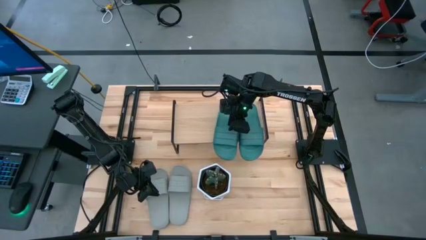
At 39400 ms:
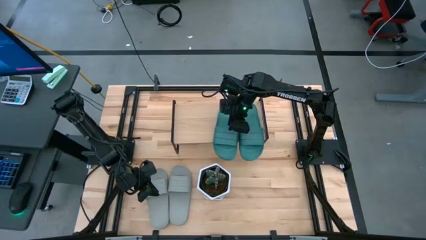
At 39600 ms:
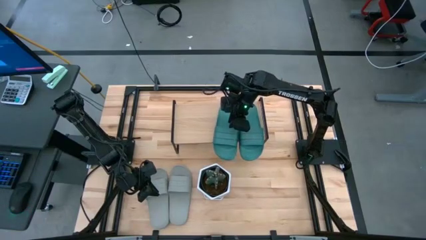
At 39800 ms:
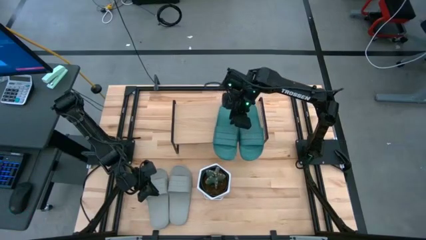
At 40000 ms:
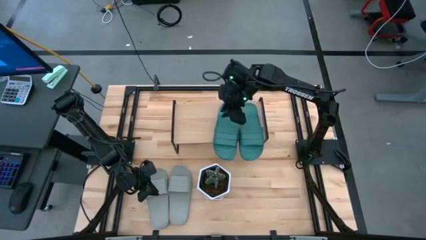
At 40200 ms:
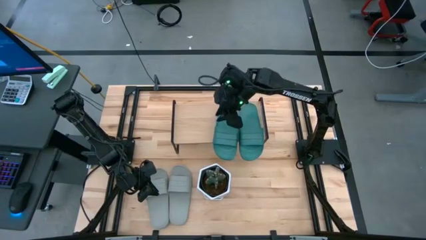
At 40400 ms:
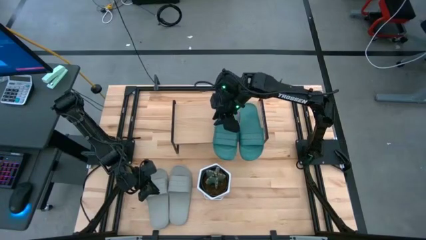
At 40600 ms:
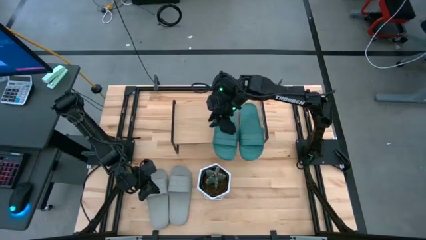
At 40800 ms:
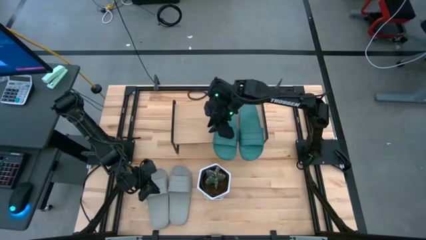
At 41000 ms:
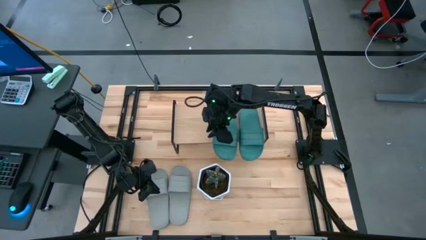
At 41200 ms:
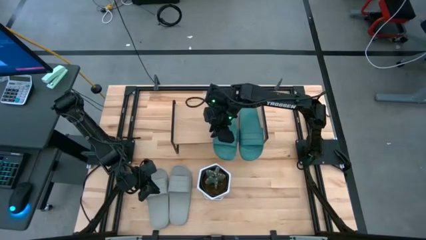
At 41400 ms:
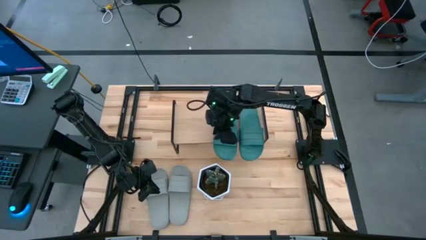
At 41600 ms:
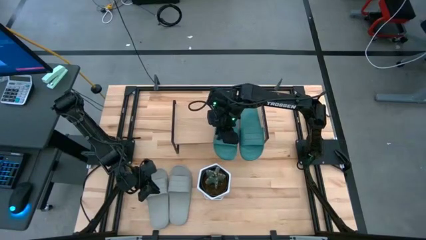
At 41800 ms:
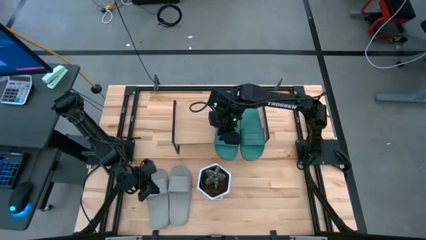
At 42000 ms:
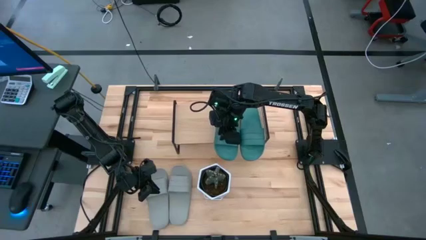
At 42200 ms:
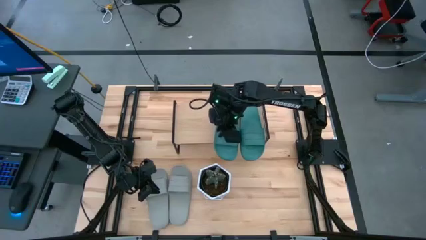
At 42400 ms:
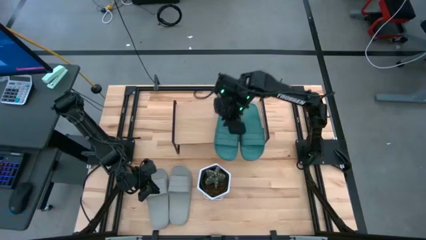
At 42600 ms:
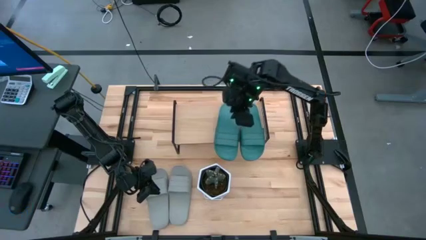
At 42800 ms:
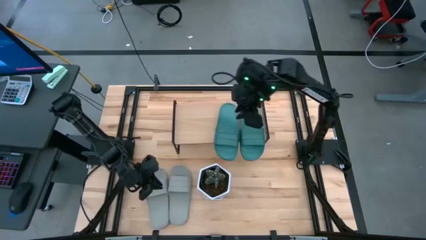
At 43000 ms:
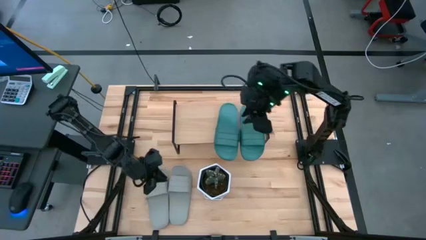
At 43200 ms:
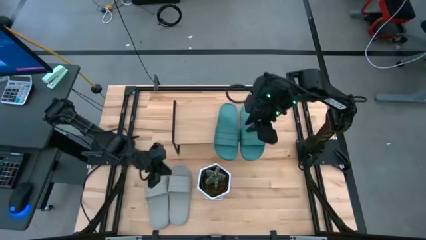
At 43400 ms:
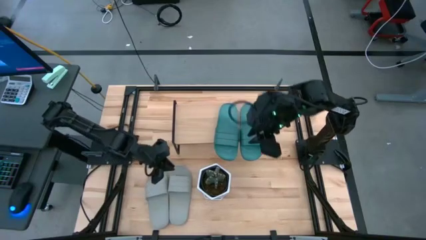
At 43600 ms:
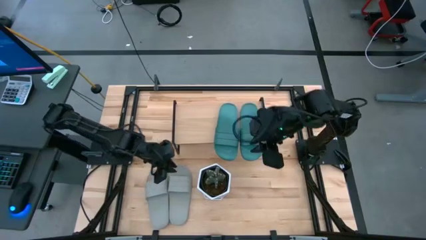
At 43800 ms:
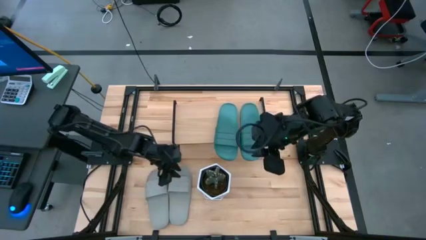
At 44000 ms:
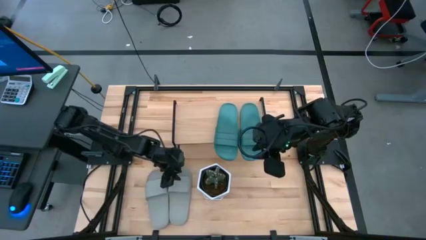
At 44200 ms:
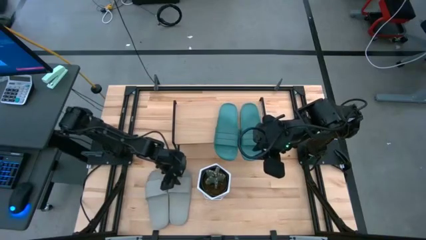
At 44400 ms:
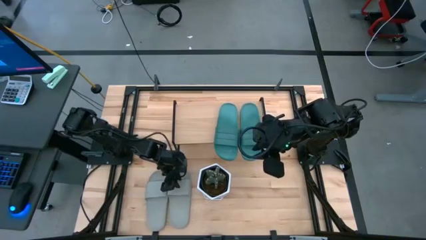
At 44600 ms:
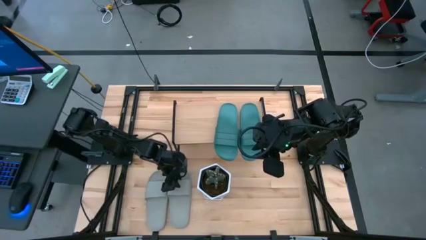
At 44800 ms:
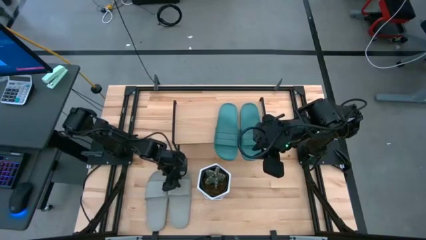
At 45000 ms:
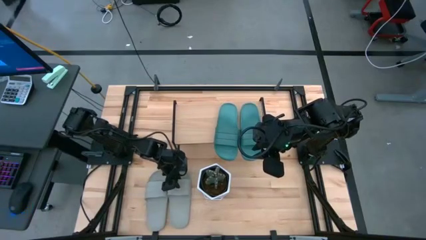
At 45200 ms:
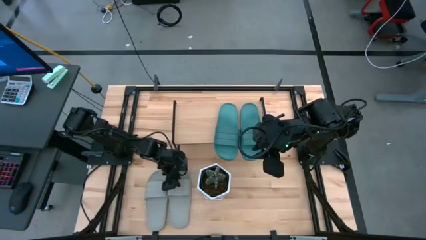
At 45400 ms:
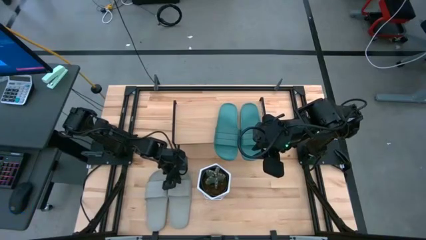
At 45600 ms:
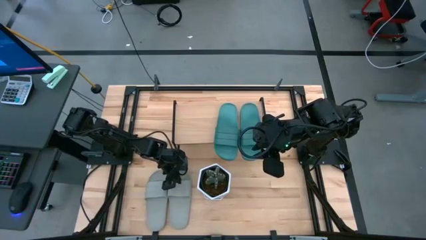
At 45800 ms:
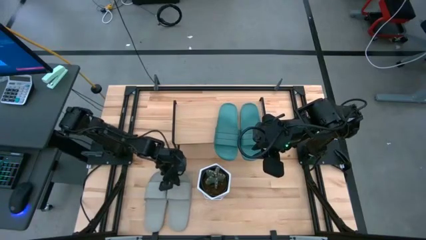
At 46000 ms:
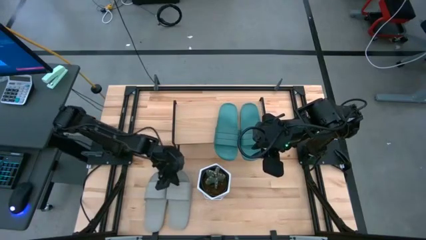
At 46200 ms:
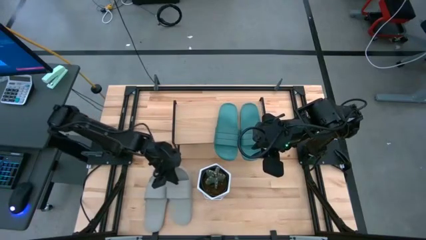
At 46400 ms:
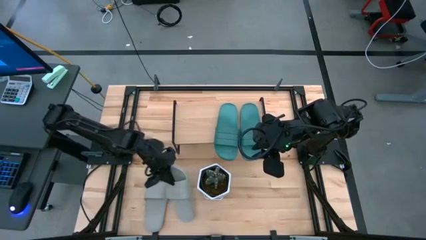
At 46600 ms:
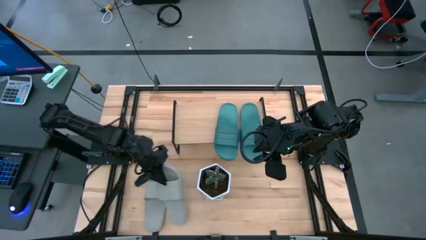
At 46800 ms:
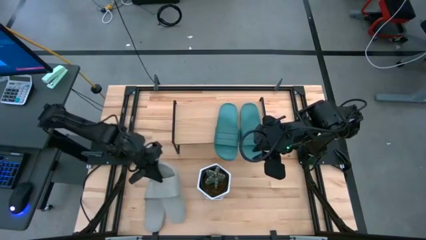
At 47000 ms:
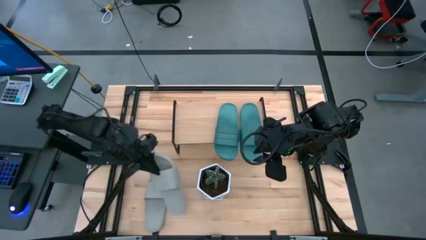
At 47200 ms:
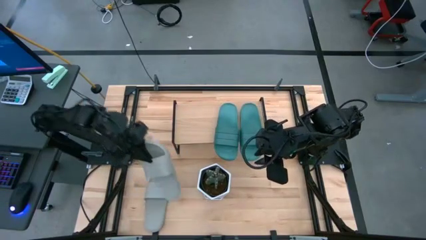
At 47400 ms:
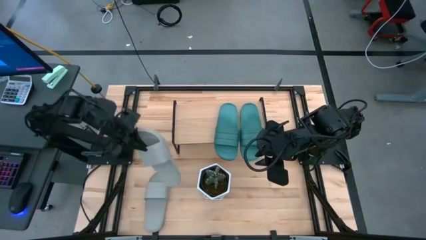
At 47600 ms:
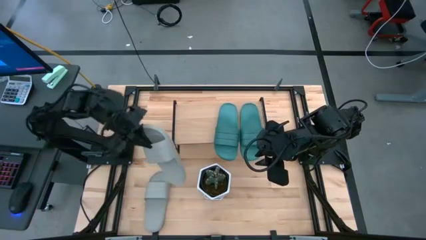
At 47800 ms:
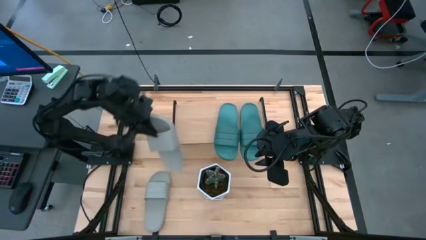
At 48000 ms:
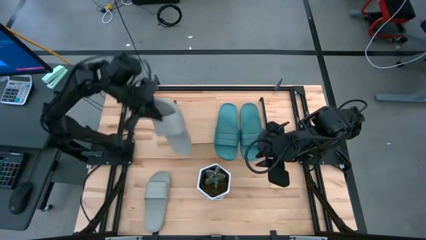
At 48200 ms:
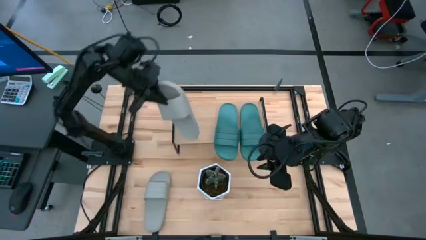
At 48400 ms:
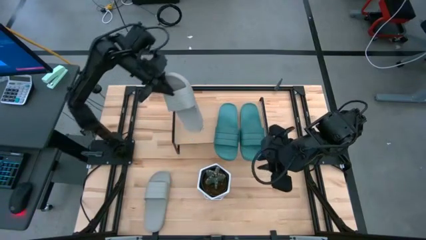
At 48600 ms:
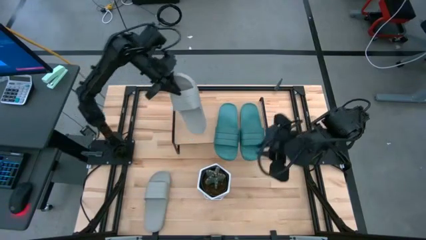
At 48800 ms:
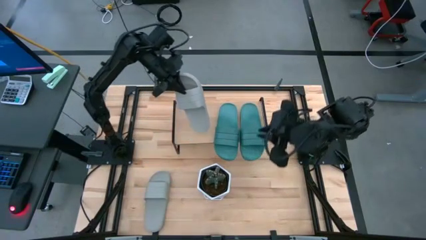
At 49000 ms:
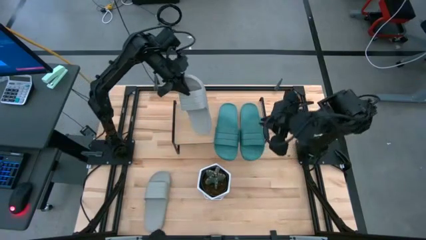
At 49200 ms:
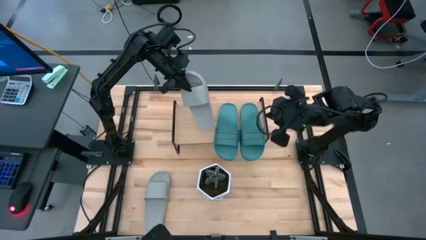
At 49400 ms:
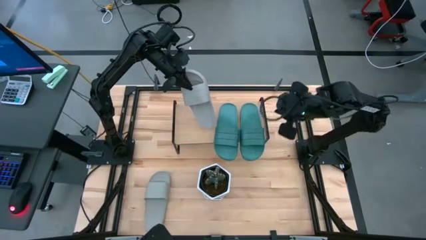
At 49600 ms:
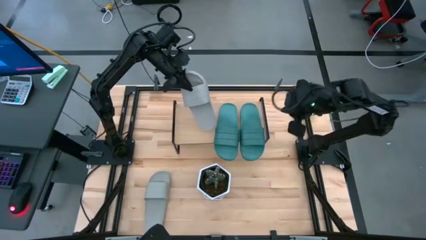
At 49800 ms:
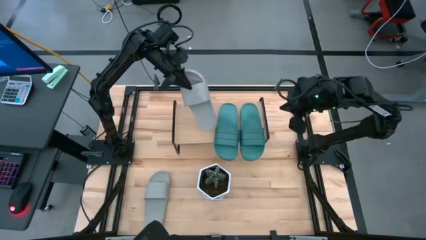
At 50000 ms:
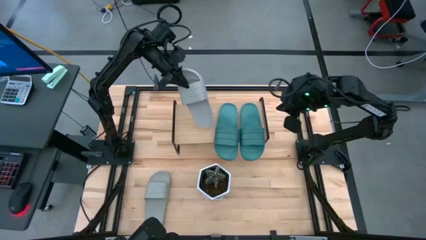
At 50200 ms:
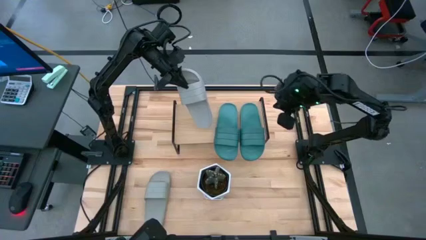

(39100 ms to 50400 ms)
Task: Pick and place slides into the shelf
Put the right gray slide on the shelf

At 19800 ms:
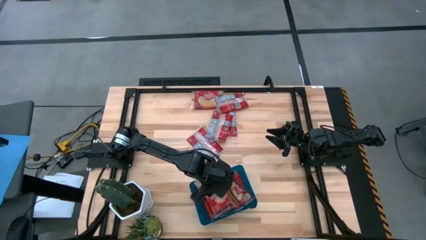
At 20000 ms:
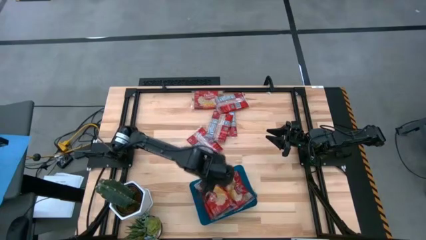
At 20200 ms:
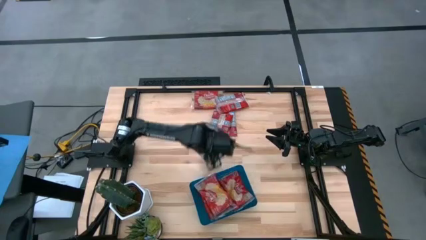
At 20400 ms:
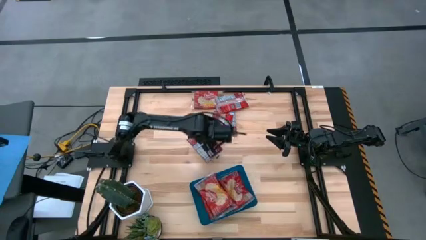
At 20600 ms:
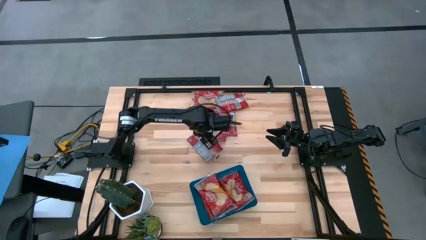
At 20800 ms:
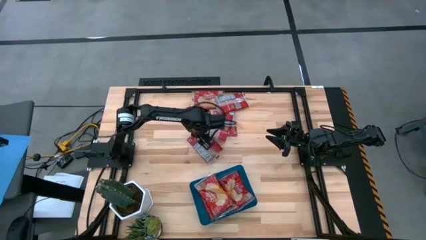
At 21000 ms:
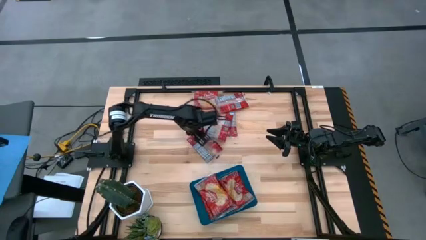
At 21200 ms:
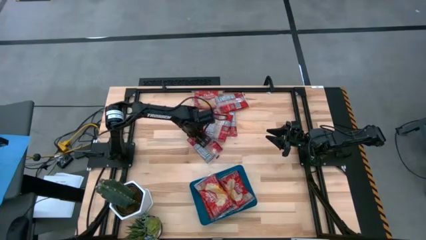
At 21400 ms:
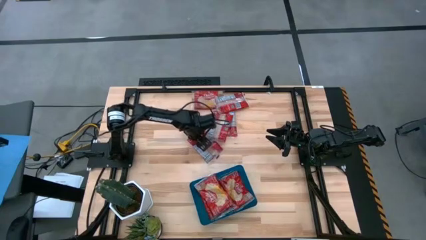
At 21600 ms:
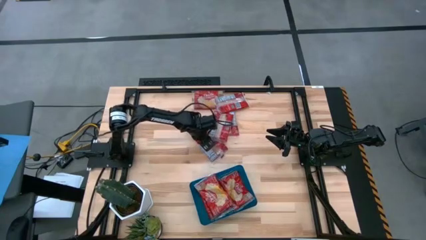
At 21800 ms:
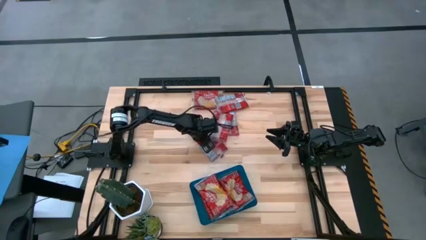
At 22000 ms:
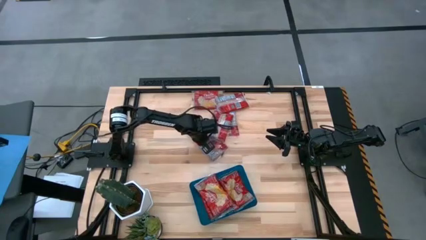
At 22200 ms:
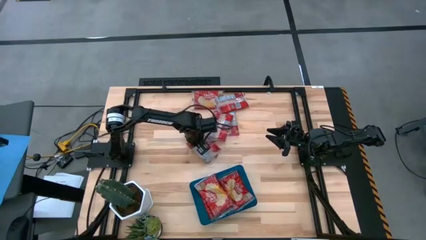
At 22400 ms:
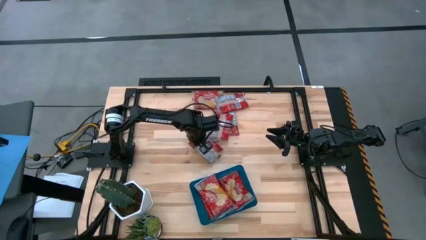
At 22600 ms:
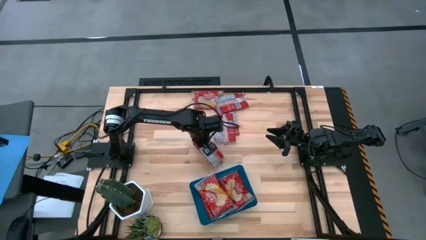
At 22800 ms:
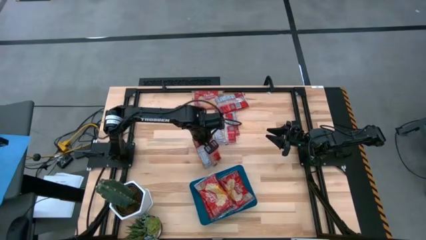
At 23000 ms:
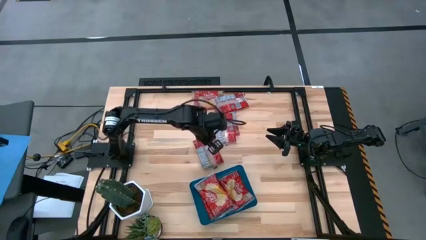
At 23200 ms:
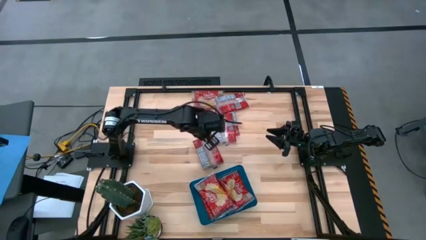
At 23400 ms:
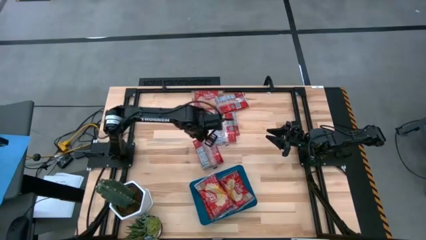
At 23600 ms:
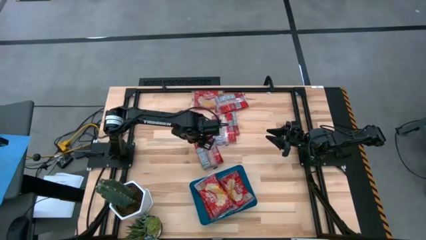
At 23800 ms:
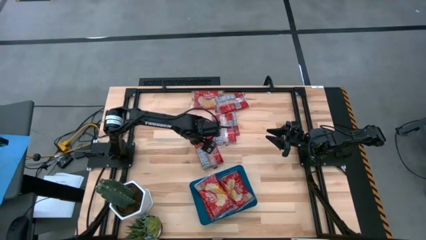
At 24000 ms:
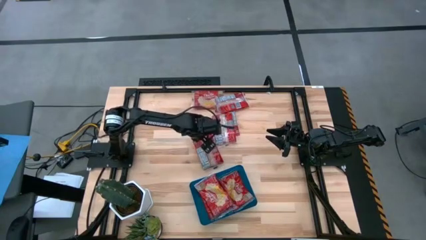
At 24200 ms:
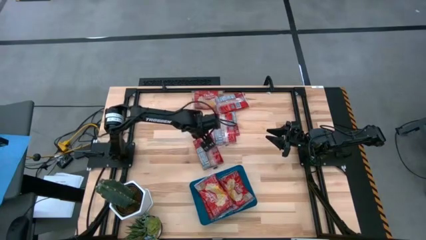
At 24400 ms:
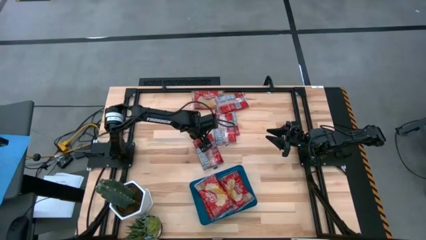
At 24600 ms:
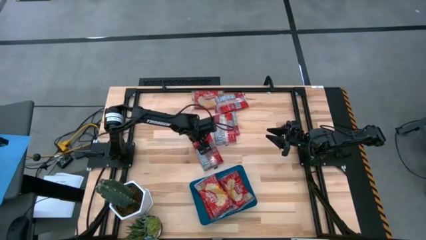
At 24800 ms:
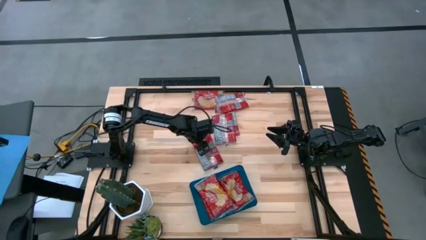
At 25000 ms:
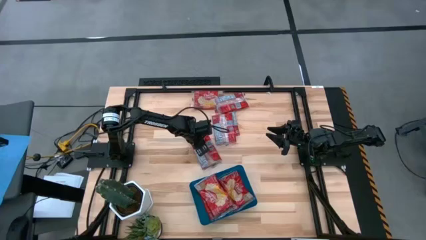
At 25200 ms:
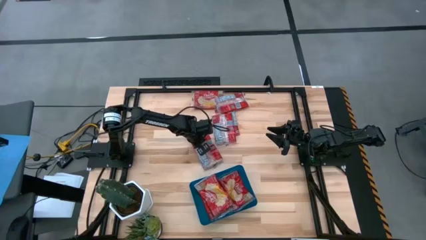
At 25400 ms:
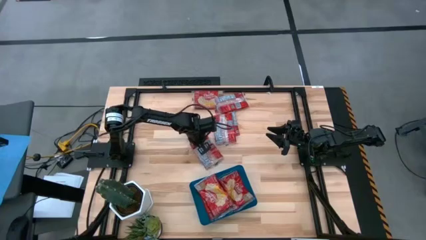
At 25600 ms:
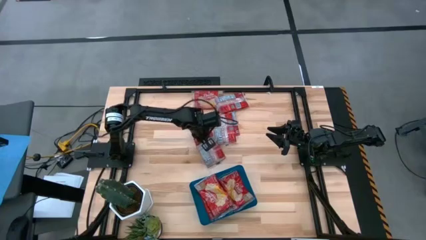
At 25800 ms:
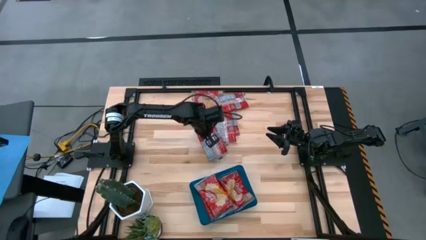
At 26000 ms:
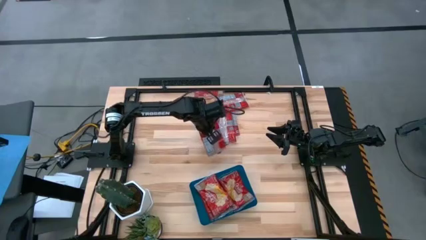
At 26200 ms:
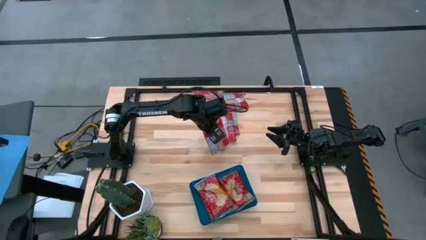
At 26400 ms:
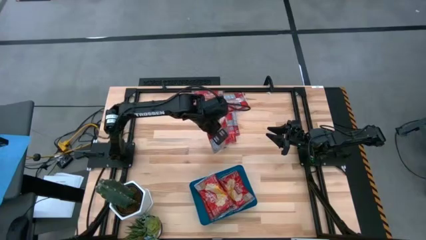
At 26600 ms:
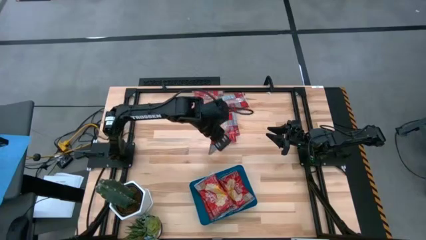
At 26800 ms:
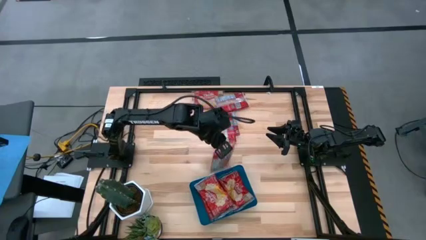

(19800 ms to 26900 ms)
Task: Sort popcorn bags into baskets
Put the popcorn bag into the blue bin
